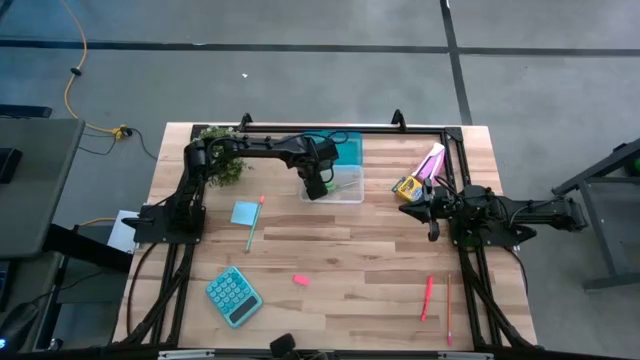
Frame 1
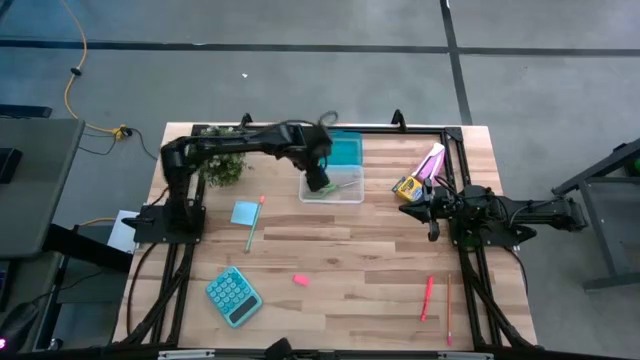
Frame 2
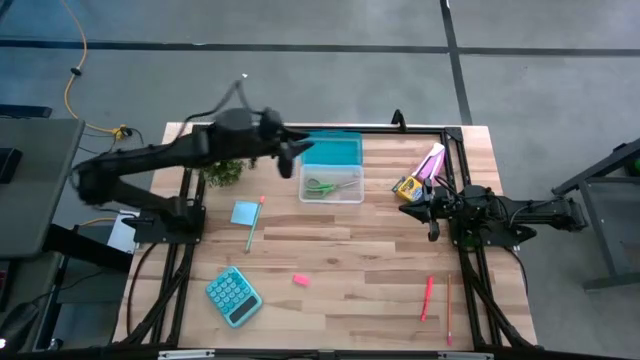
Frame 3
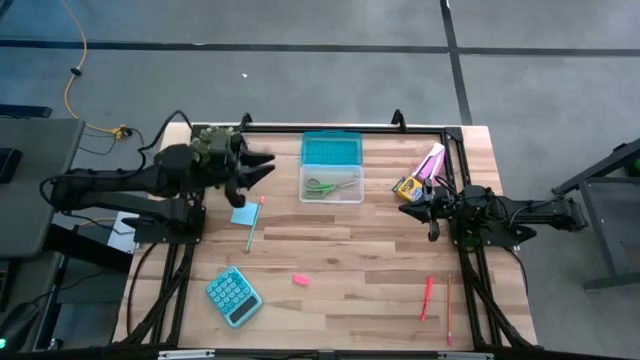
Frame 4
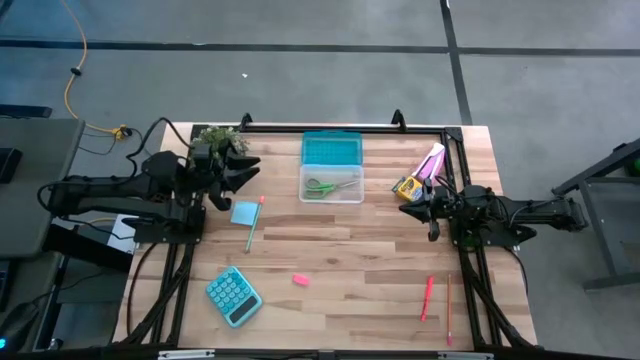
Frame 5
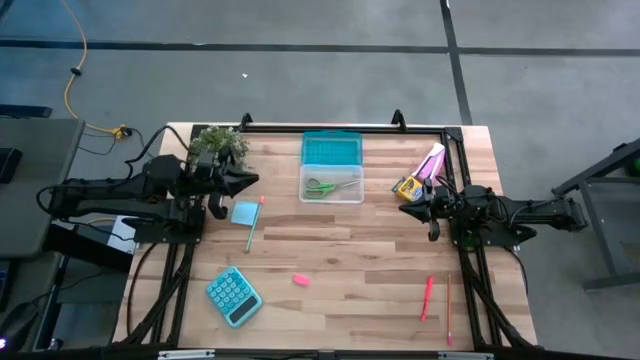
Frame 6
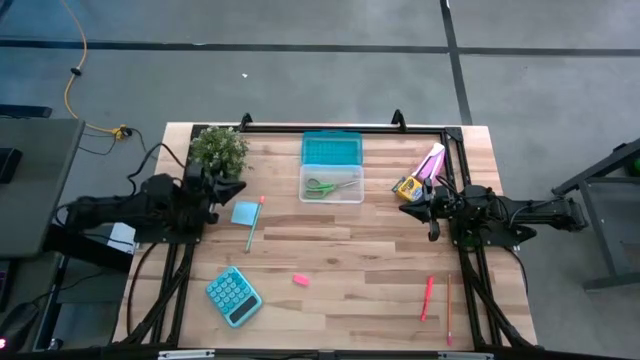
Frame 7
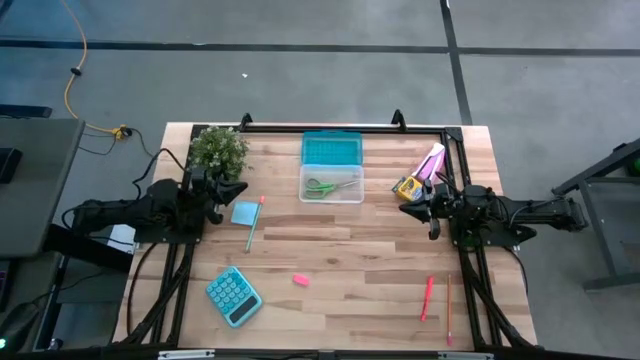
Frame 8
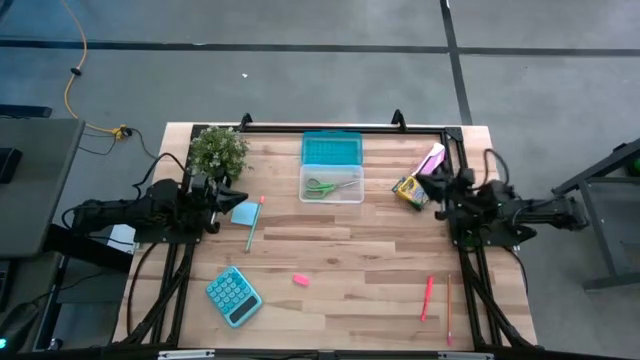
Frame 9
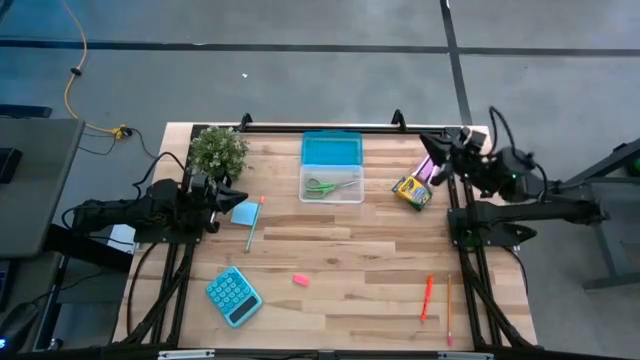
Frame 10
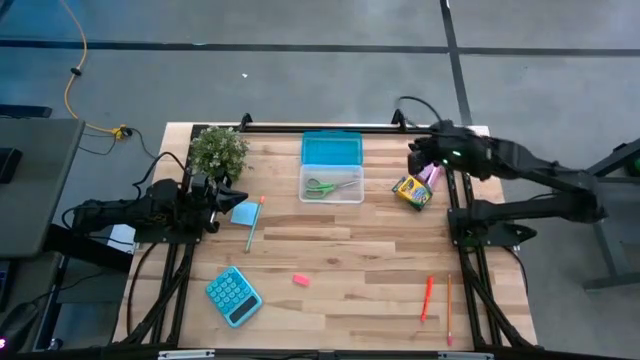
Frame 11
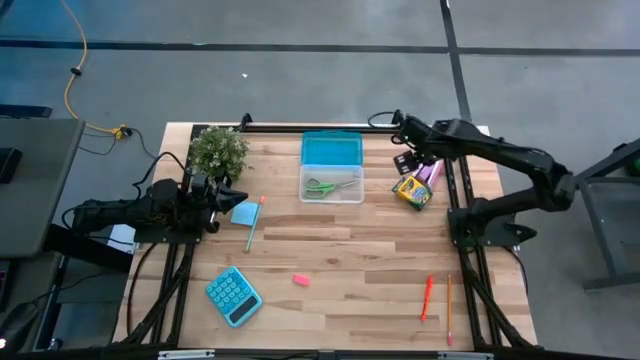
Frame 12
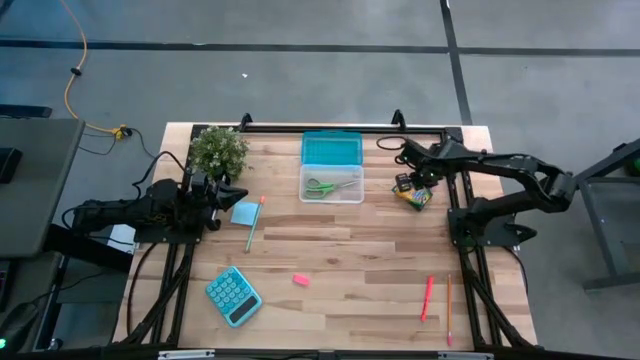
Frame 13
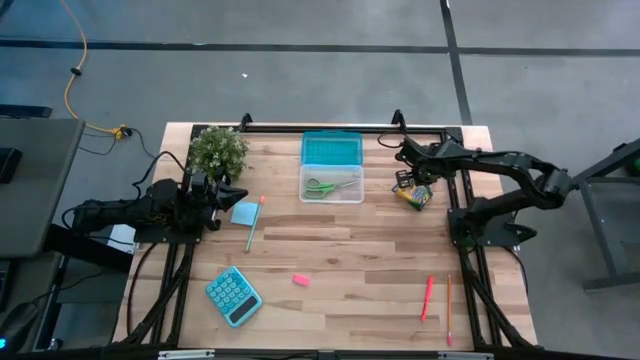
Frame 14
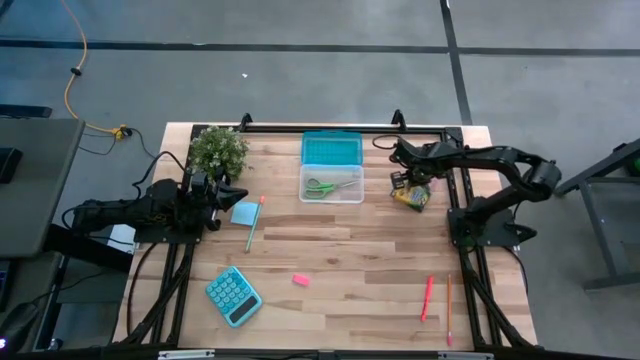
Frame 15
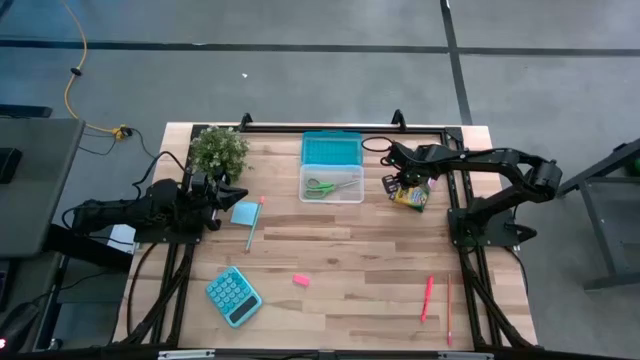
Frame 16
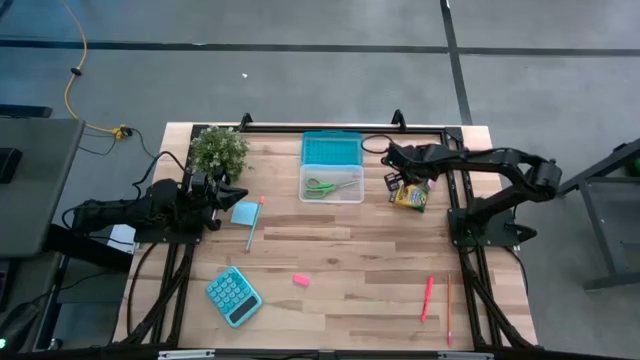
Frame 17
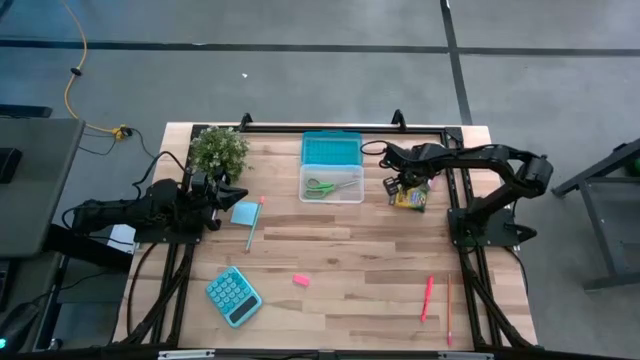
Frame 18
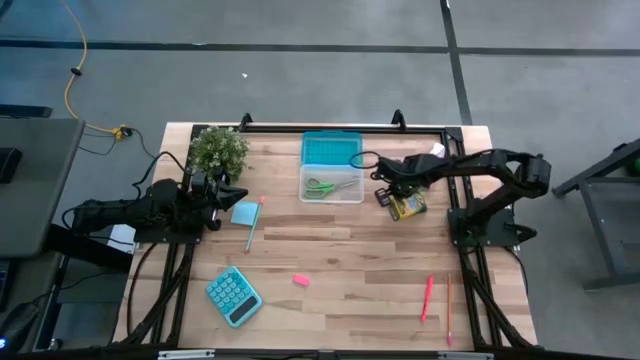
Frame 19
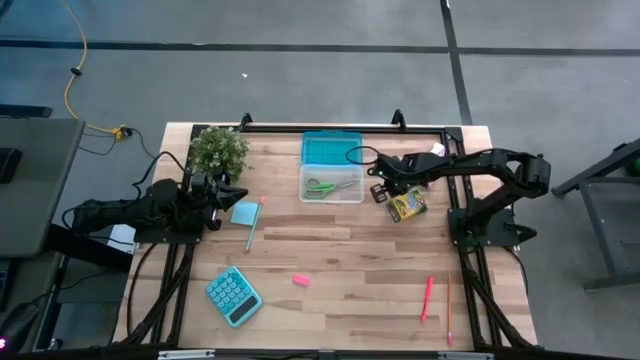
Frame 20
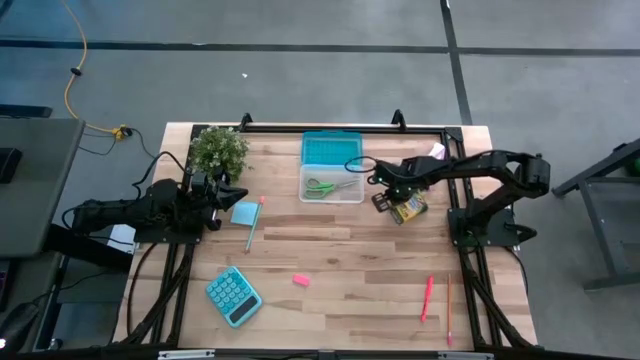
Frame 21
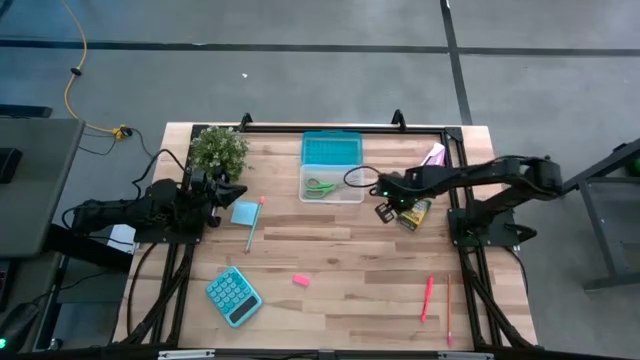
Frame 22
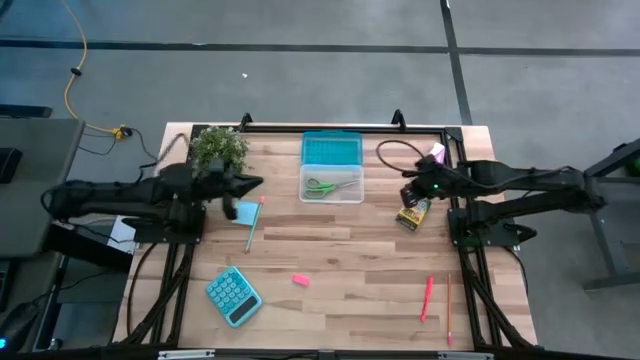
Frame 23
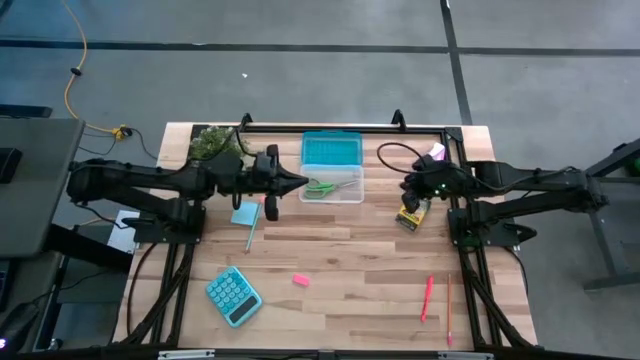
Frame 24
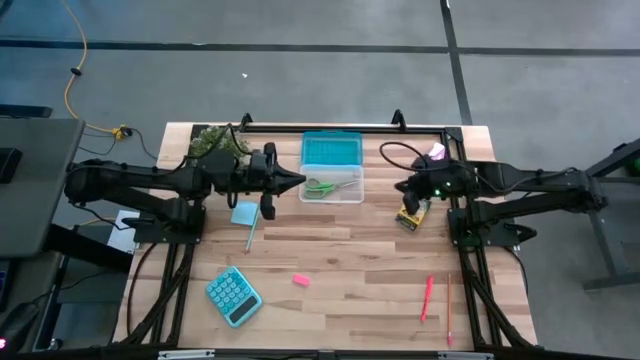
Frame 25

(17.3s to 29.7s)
Task: Pack school essentials
Put the crayon box into the supply box

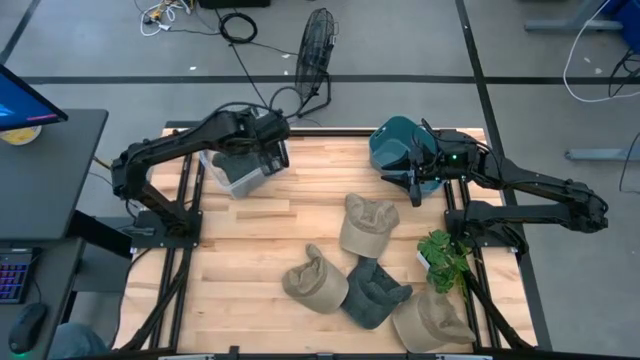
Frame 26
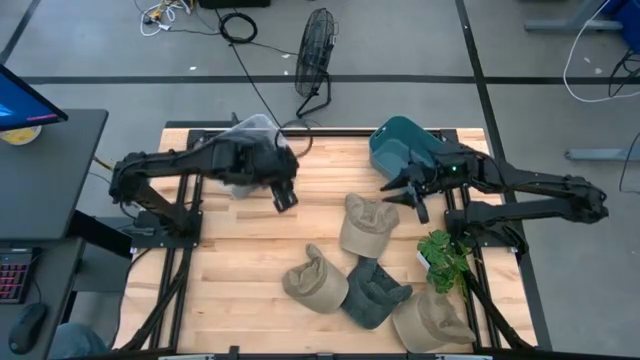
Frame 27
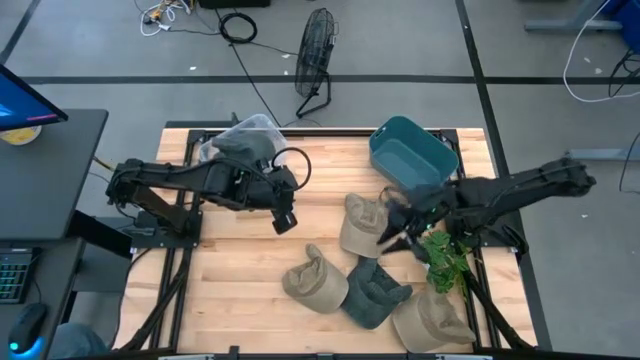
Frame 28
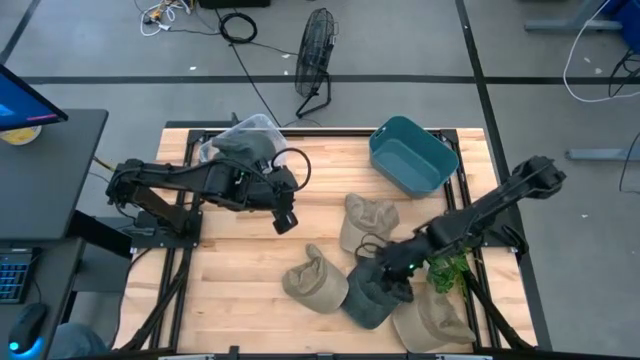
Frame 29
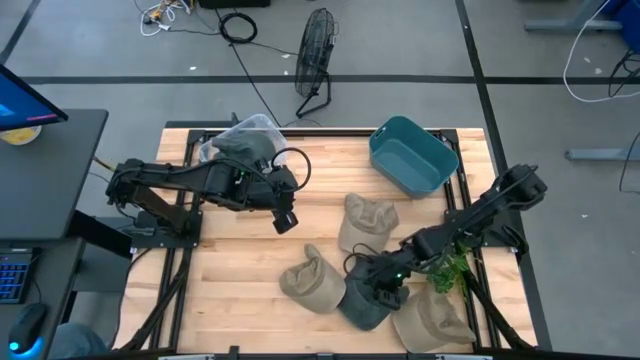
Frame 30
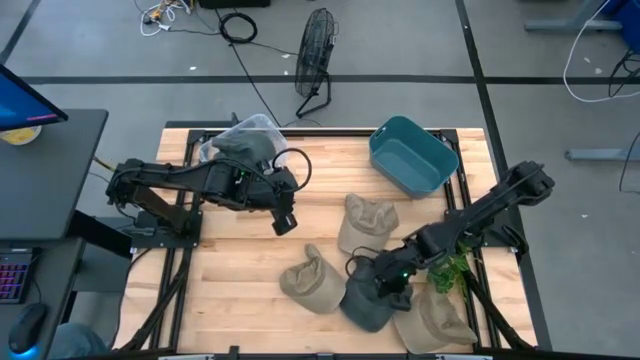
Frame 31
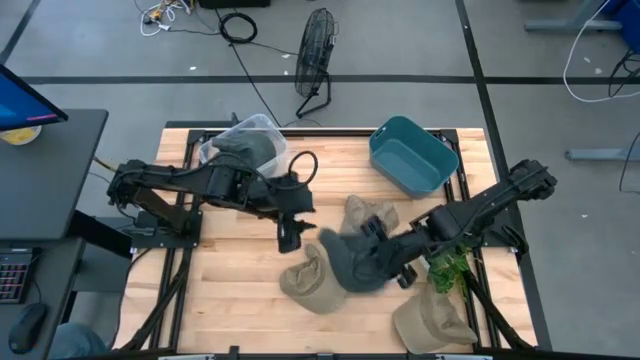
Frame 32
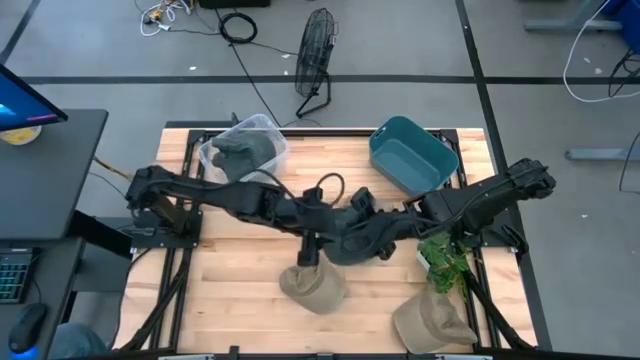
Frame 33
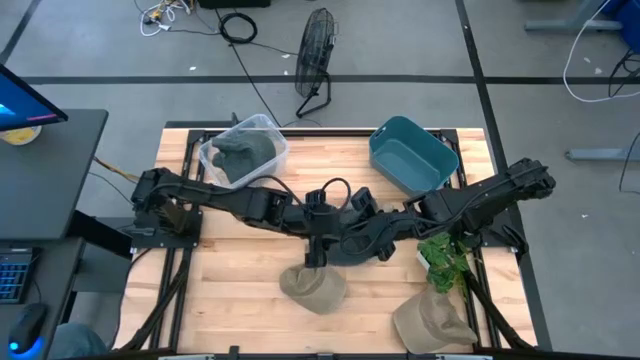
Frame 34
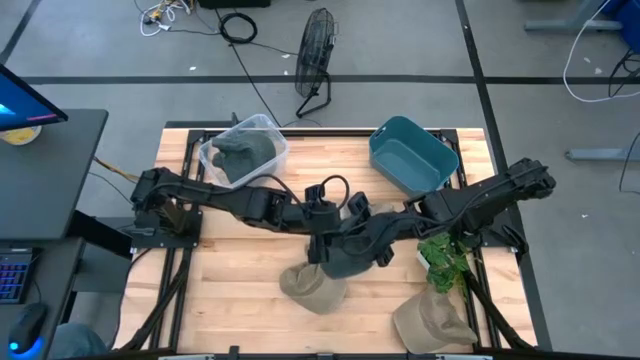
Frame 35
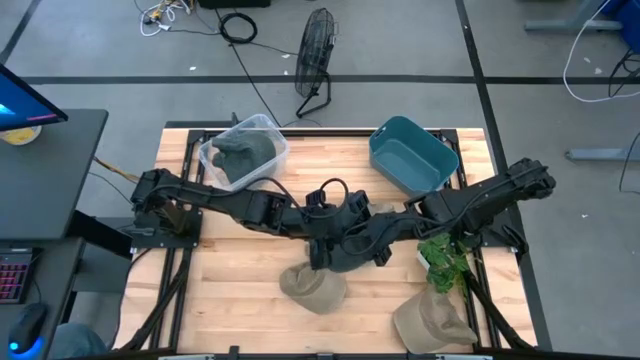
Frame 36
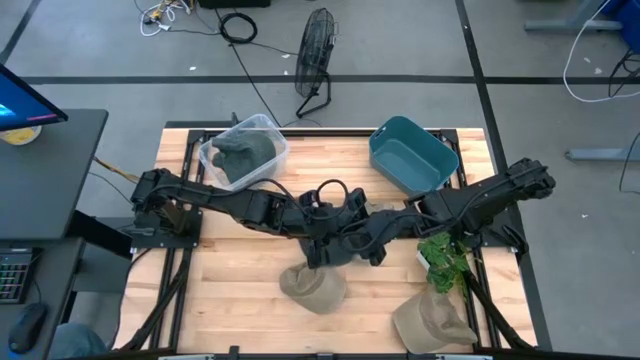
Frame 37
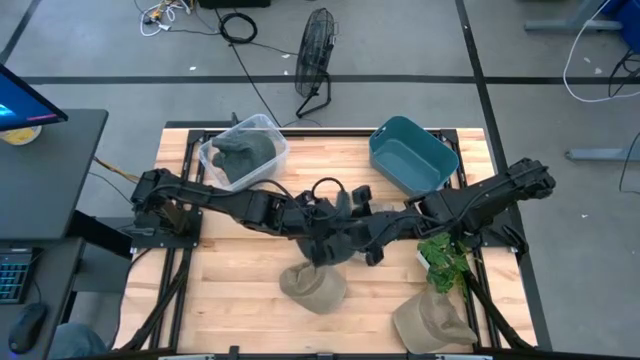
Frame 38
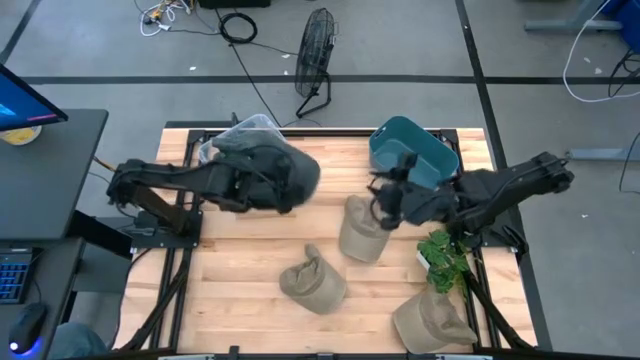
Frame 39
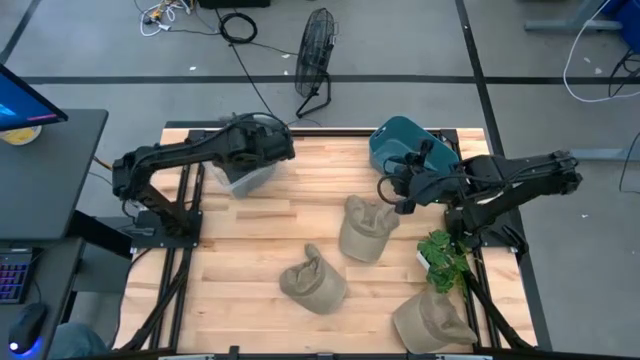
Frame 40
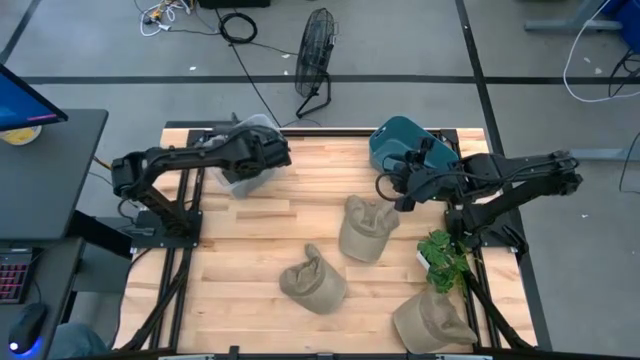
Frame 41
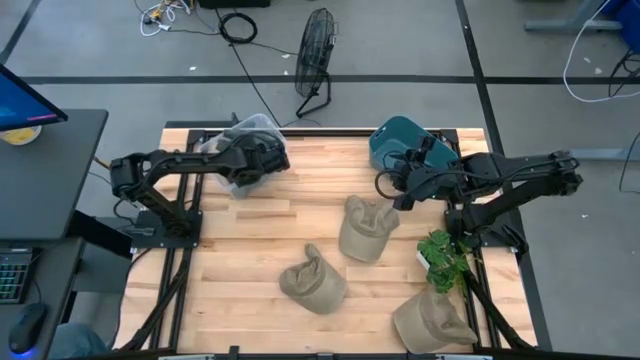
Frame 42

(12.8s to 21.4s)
Task: Pick & Place hat
Put the gray cap into the transparent bin
